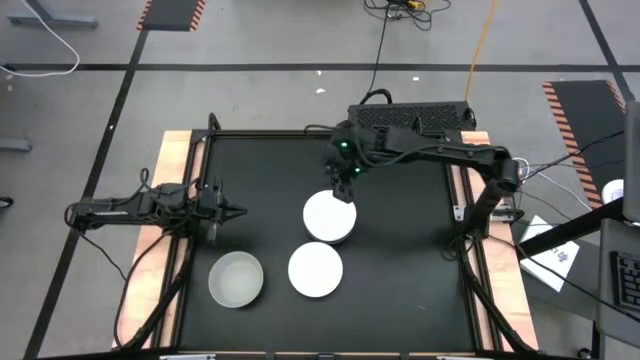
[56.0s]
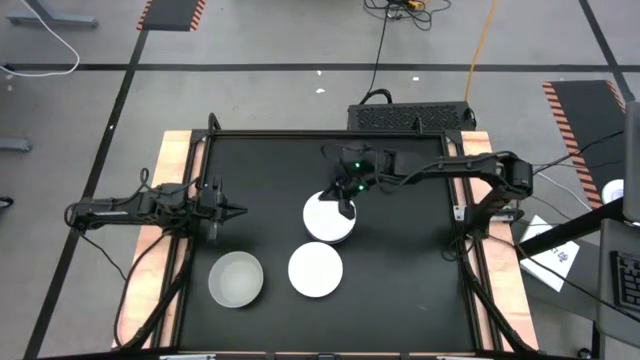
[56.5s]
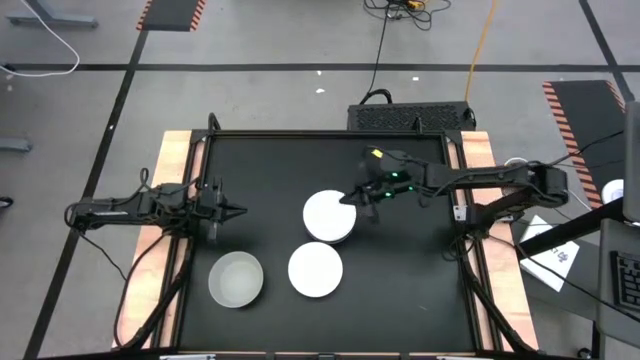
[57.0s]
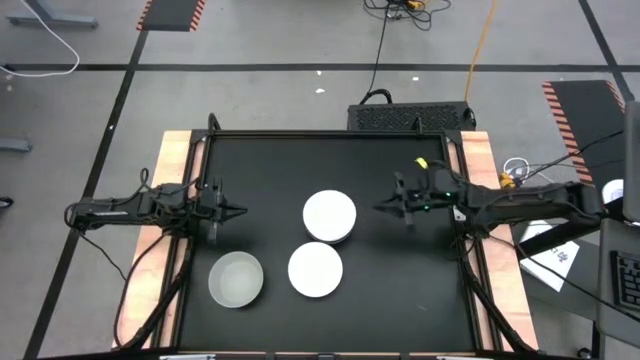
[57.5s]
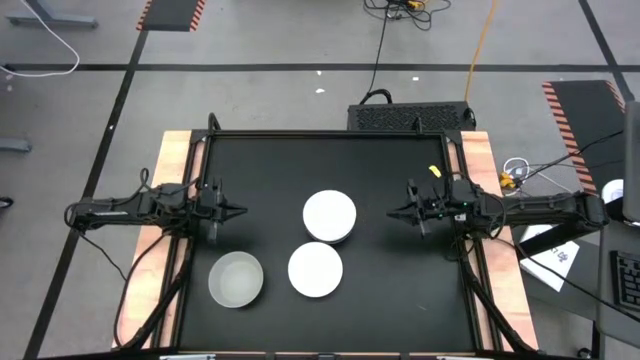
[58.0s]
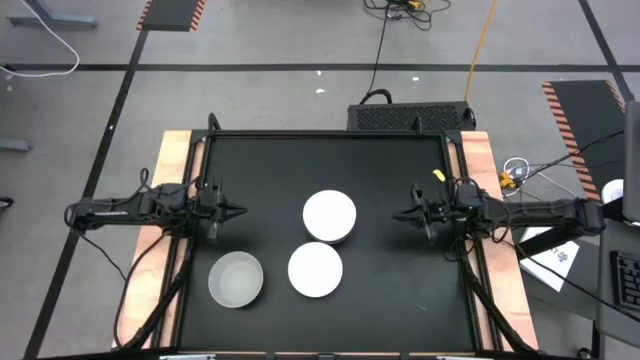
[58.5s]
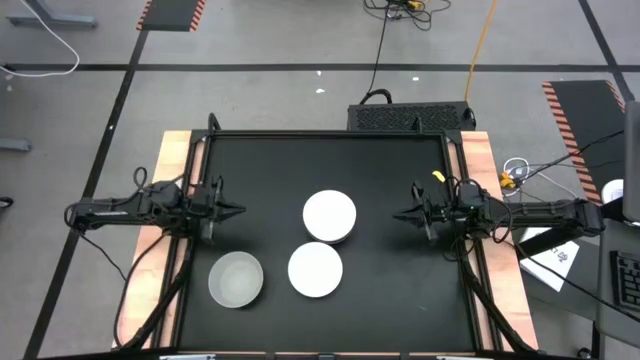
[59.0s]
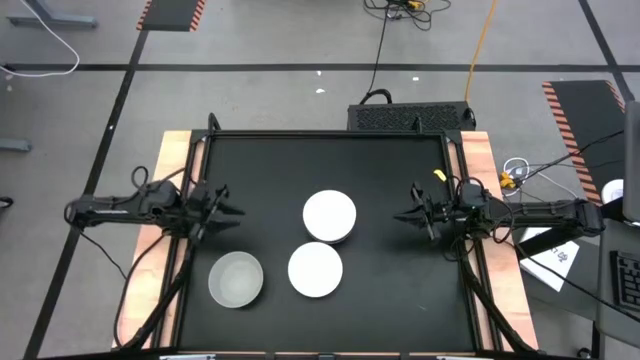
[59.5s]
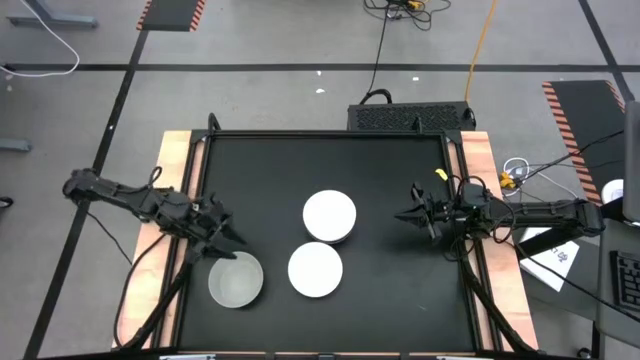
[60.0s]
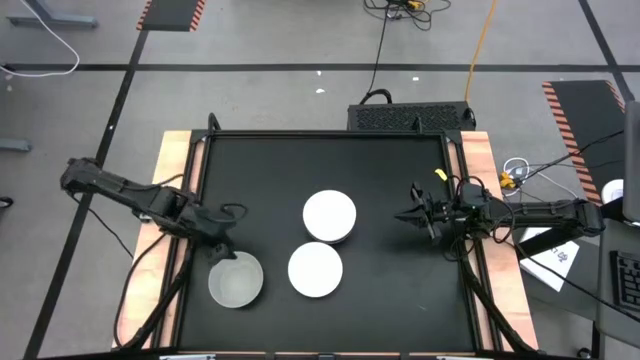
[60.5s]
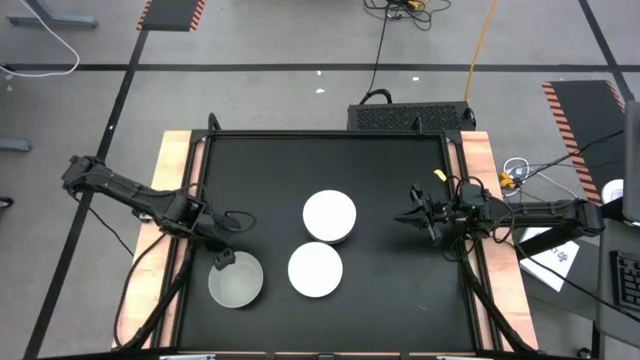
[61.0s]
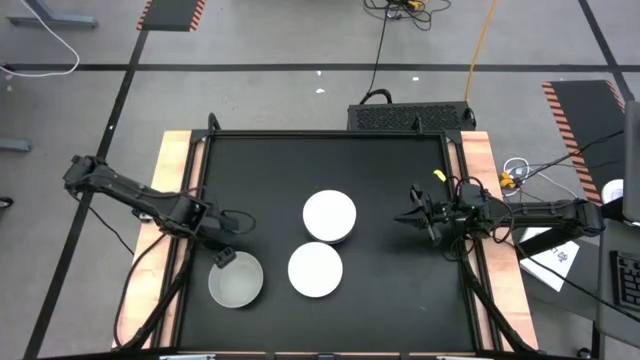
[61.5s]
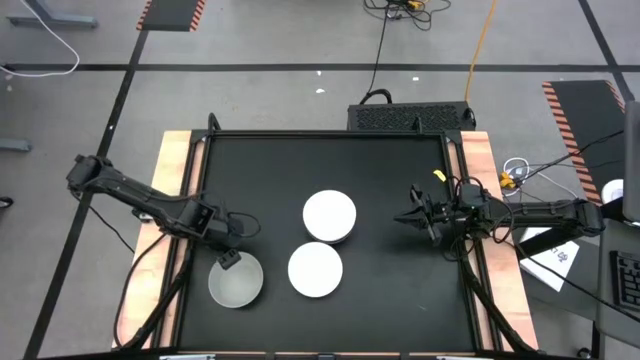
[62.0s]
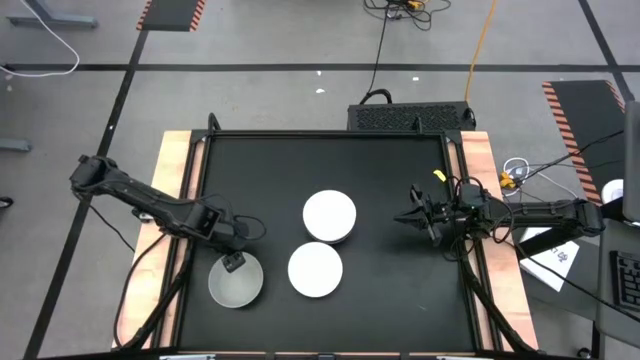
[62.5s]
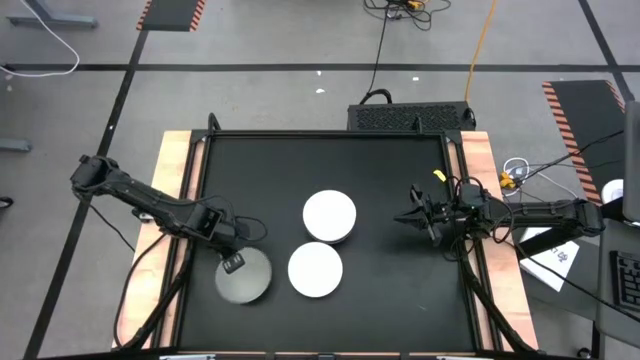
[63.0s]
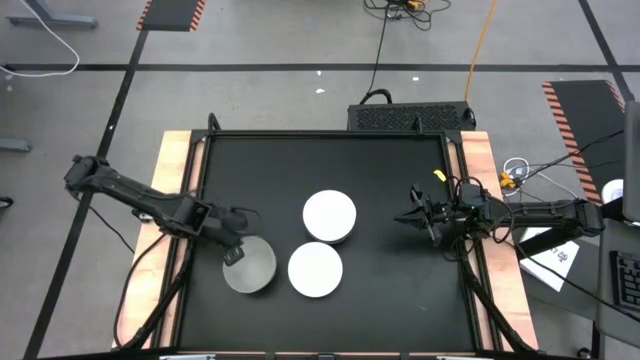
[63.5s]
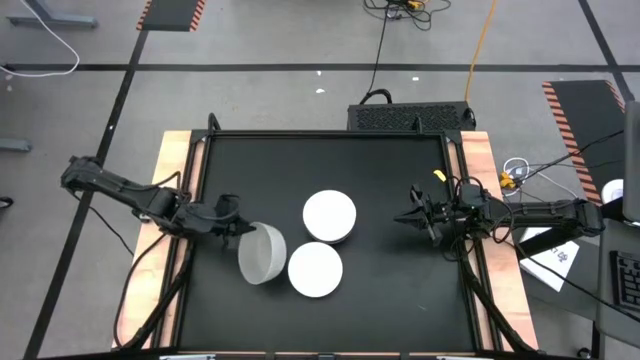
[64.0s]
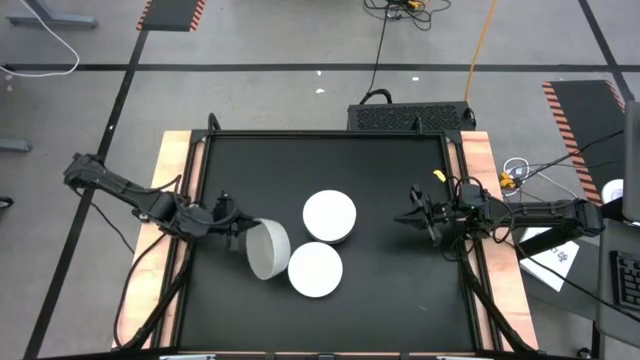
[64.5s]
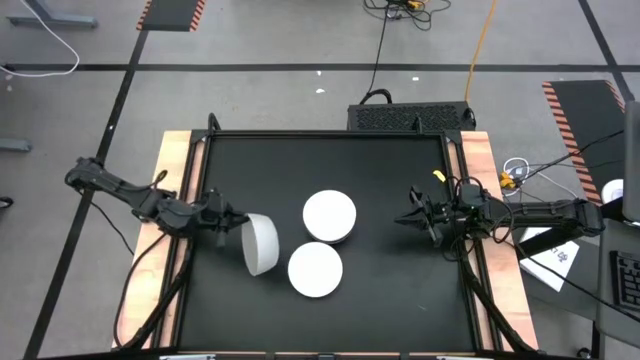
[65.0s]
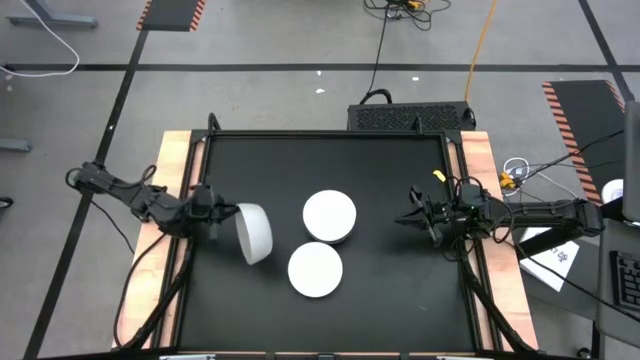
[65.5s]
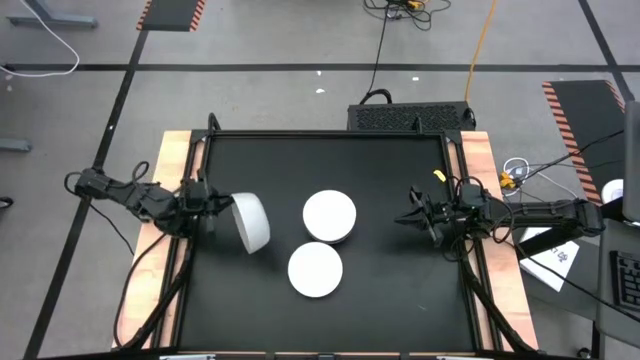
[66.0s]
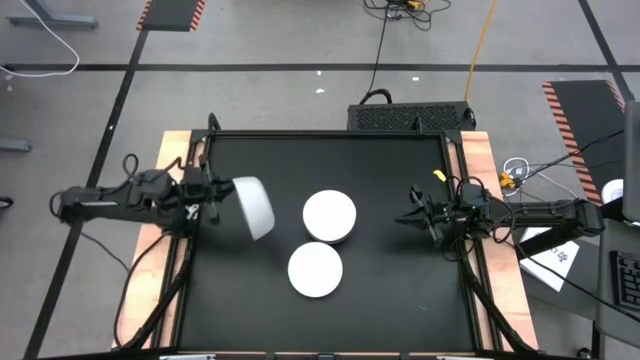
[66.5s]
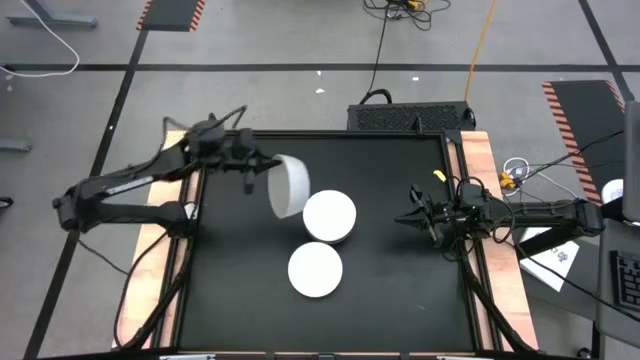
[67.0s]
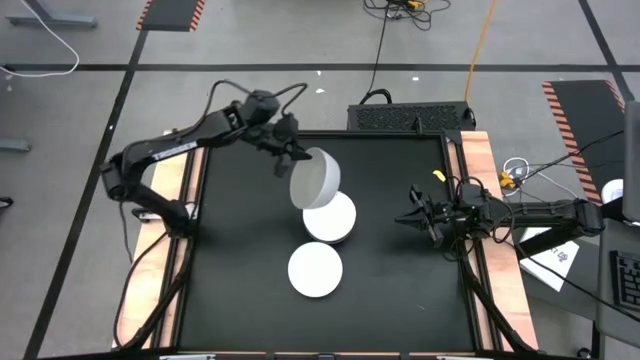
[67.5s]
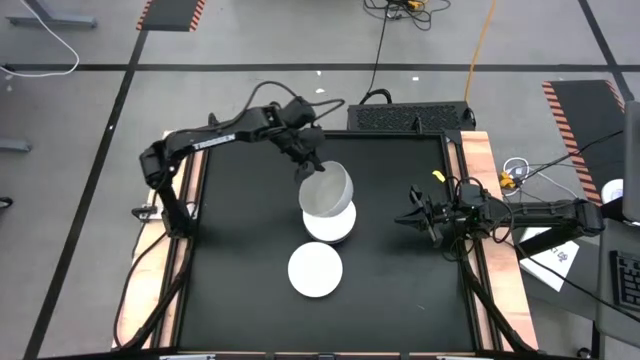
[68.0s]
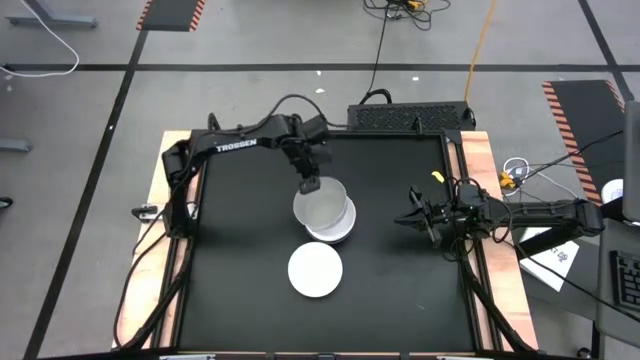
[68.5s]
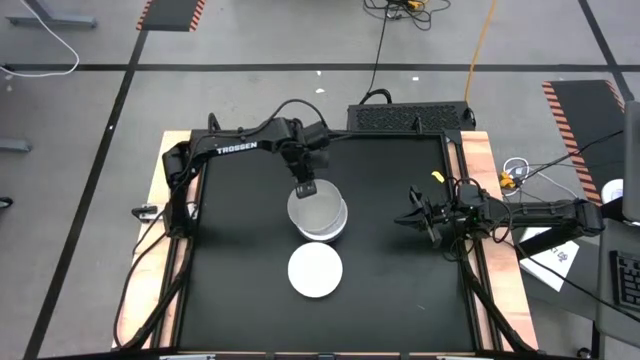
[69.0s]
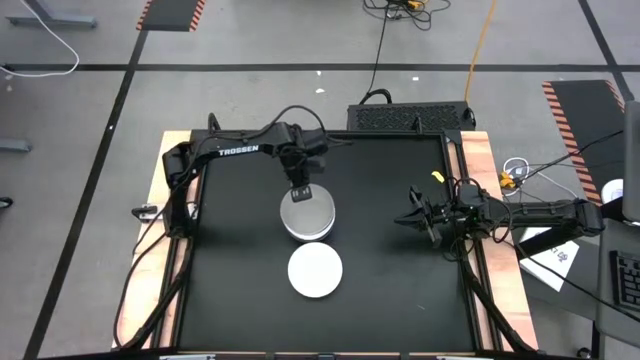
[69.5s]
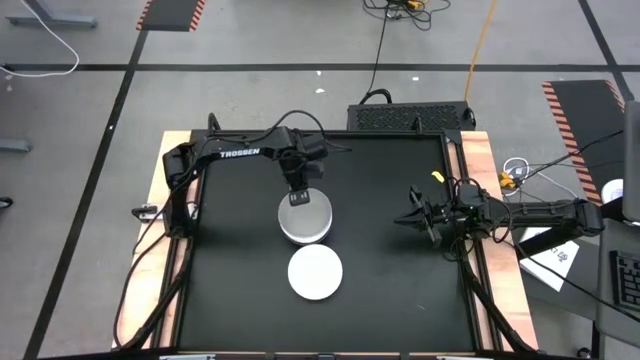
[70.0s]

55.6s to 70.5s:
Task: Nest bowls inside each other
Stack the gray bowl on the white bowl

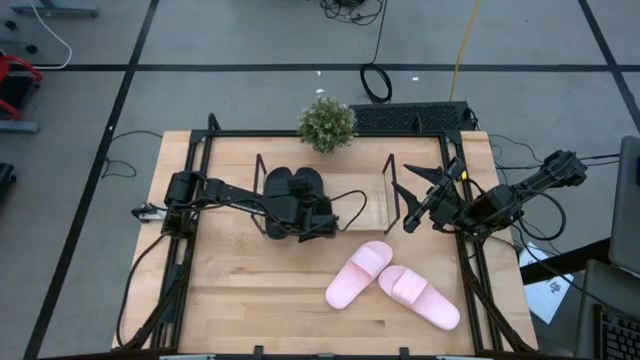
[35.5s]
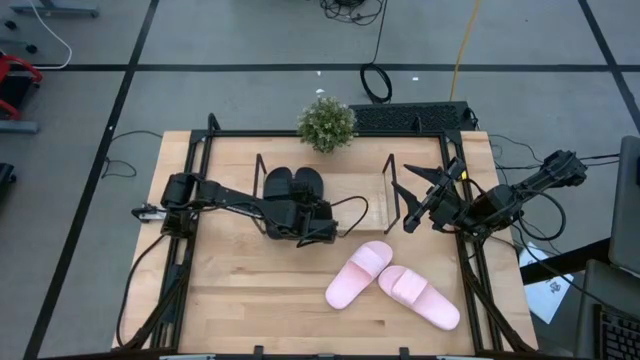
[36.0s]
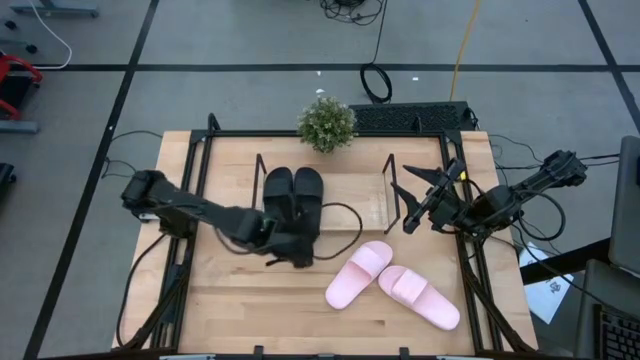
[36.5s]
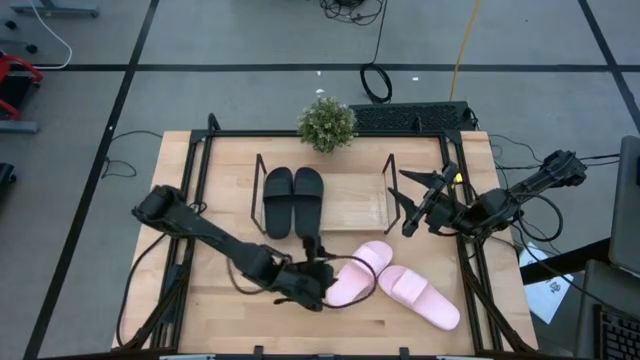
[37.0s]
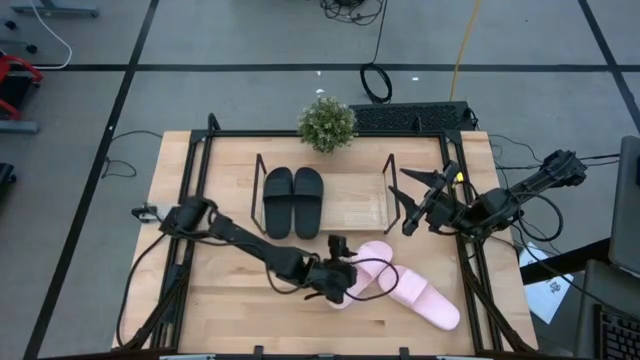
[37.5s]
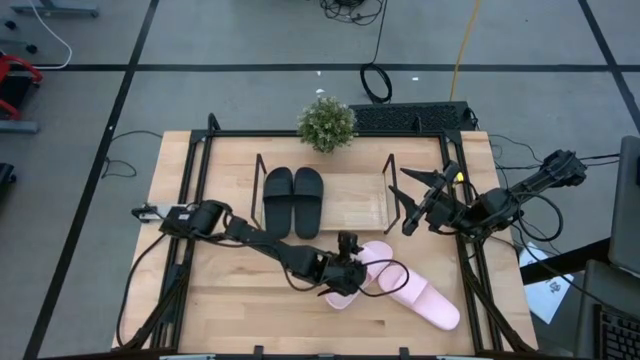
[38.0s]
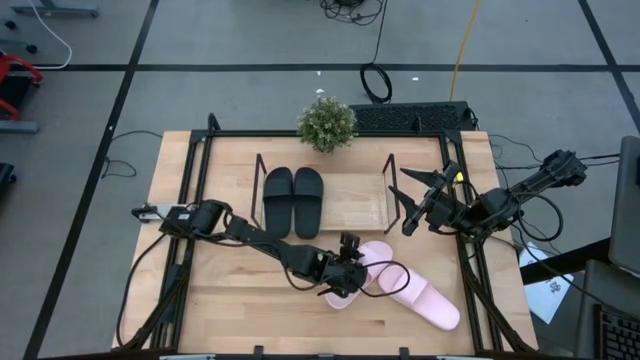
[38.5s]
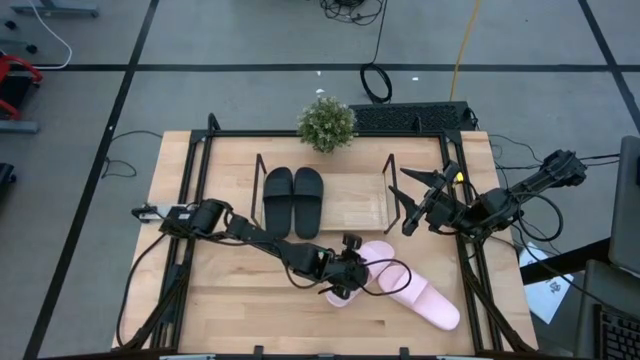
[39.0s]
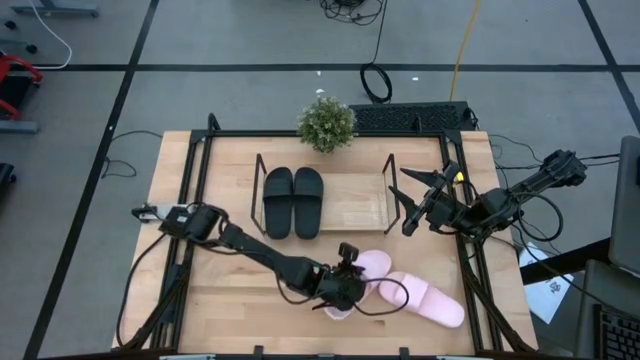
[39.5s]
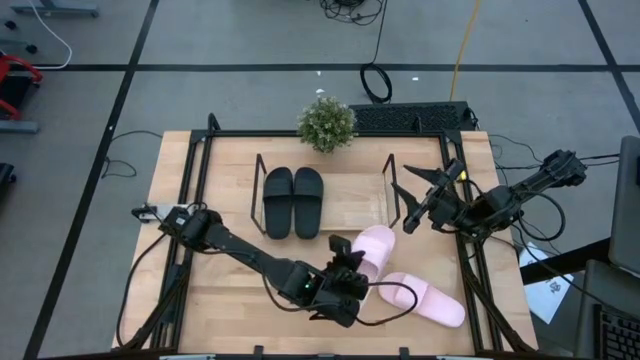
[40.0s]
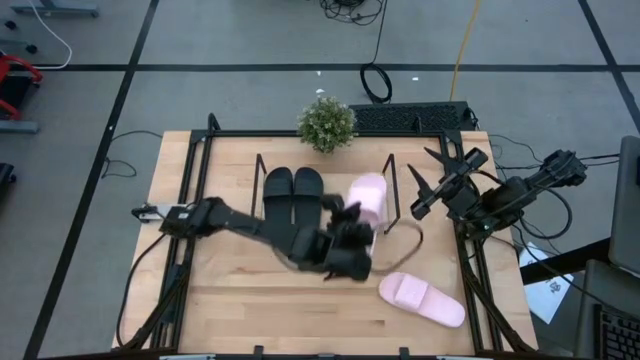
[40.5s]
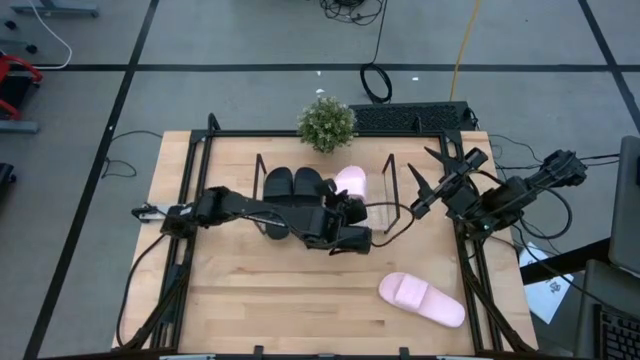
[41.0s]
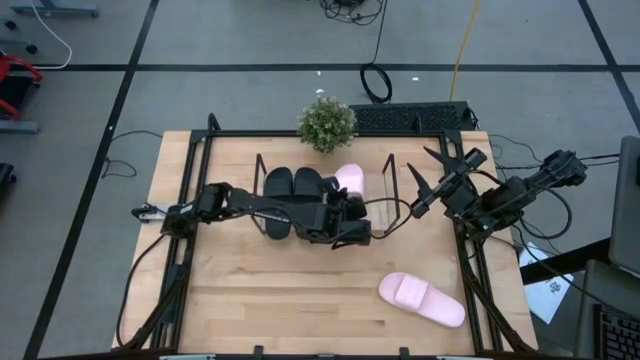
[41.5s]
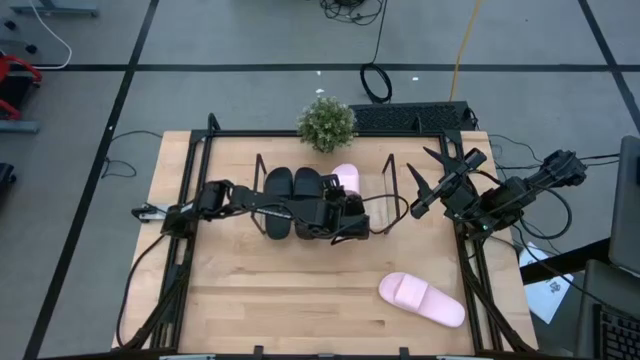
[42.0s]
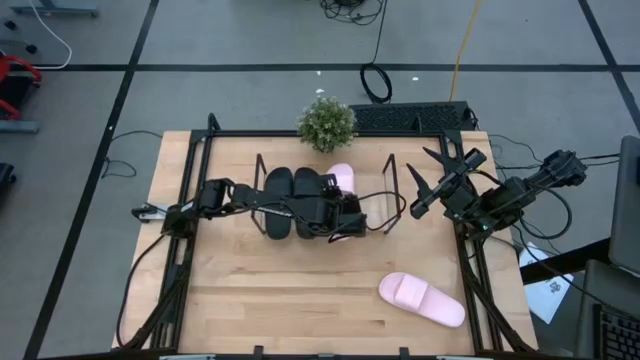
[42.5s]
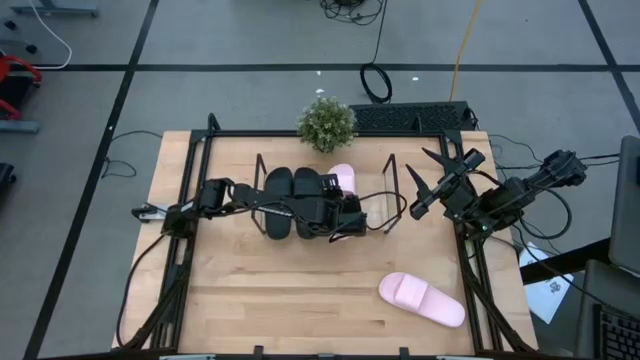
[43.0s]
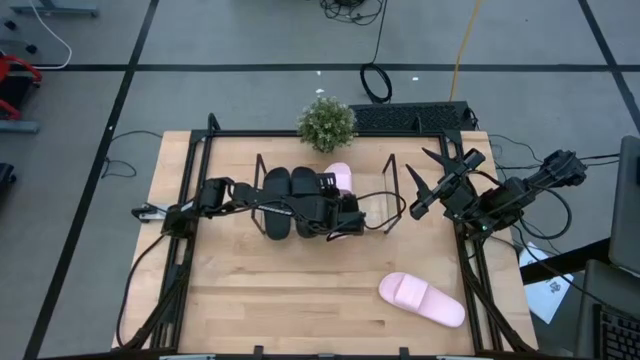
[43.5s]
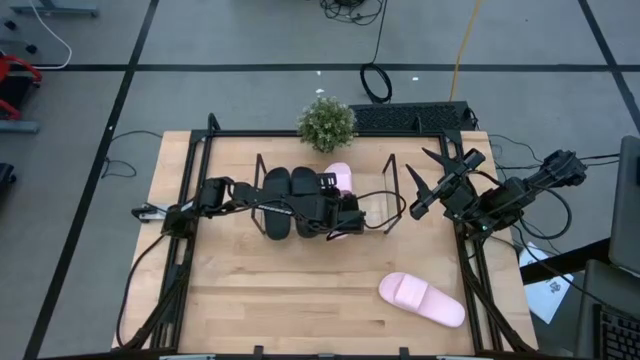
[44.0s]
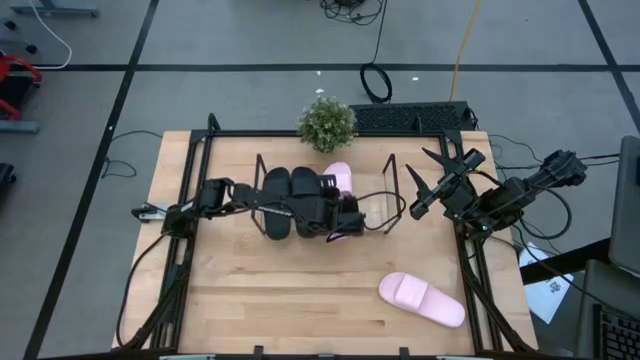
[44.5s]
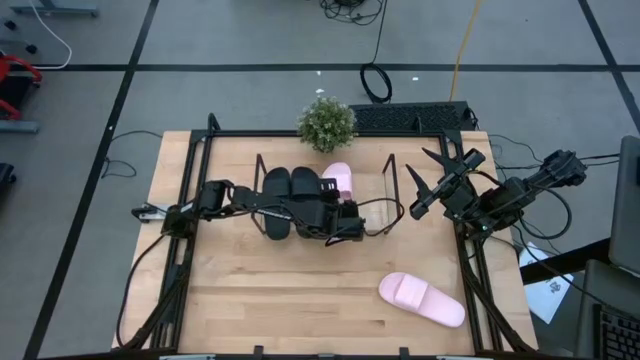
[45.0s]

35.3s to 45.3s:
Task: Pick and place slides into the shelf
Put the left pink slide on the shelf
